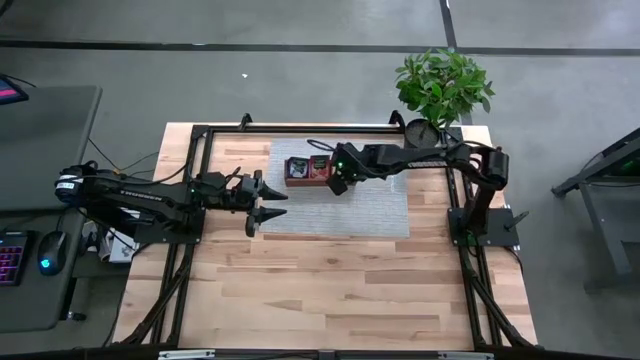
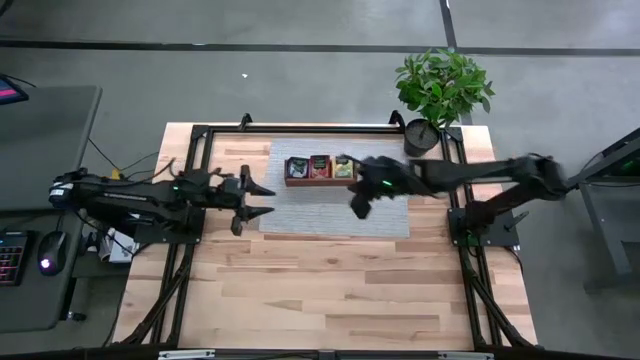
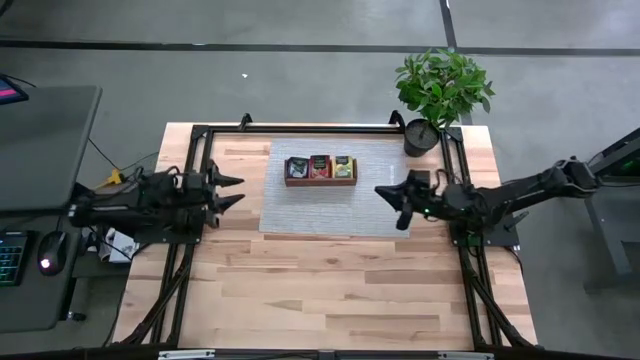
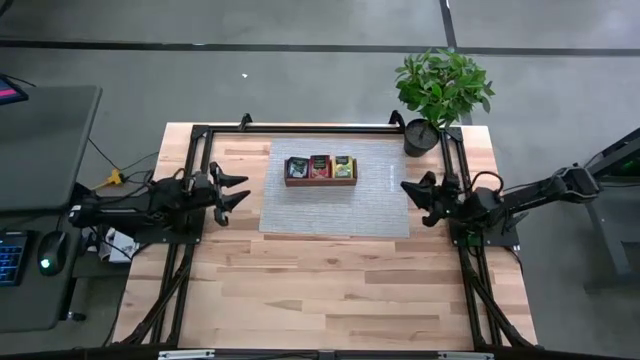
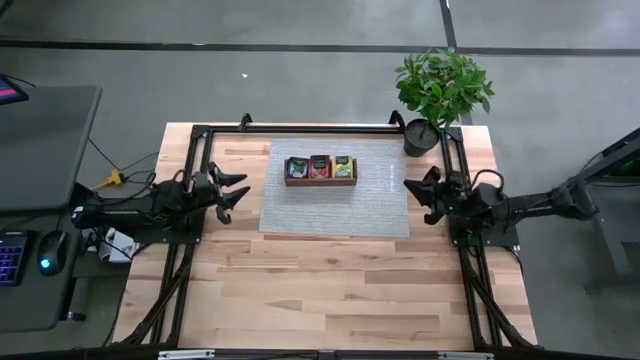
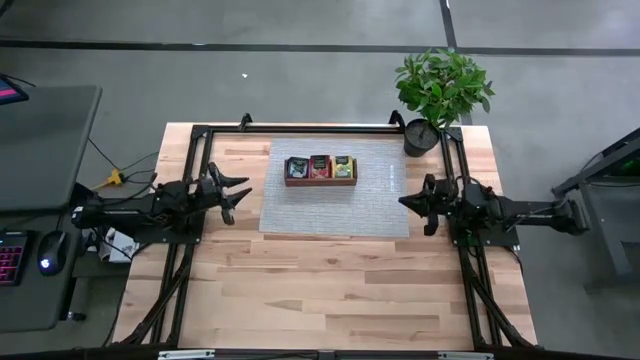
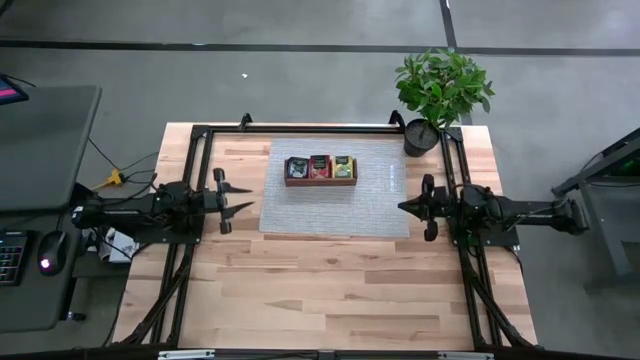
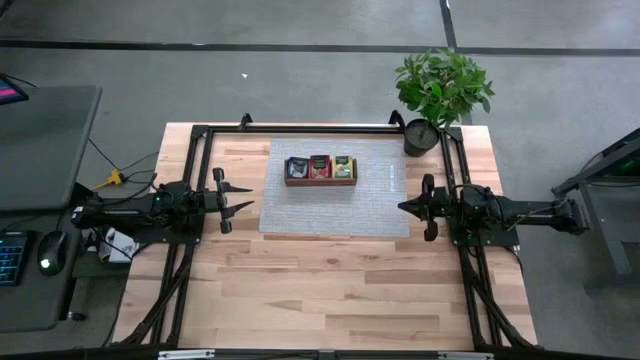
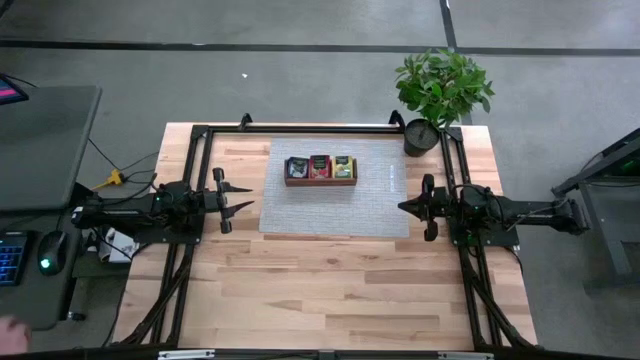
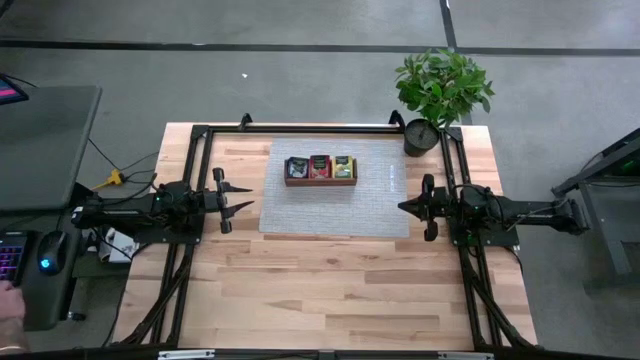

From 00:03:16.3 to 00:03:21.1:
Task: Pick & Place Tea
Return to Home Position

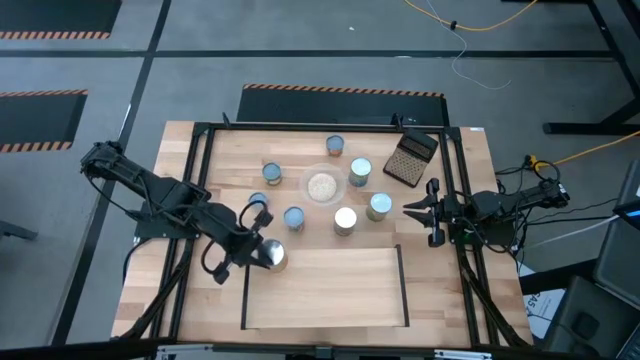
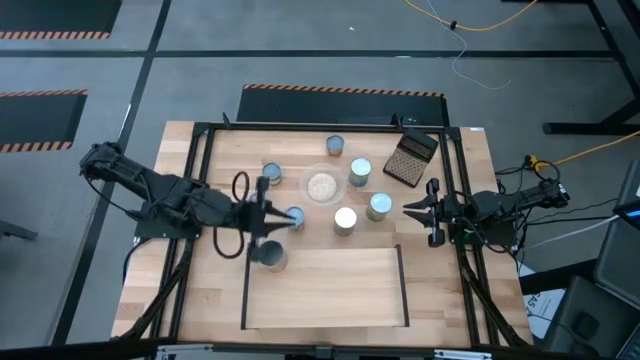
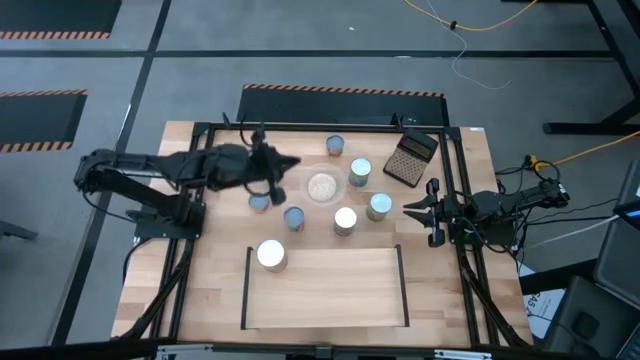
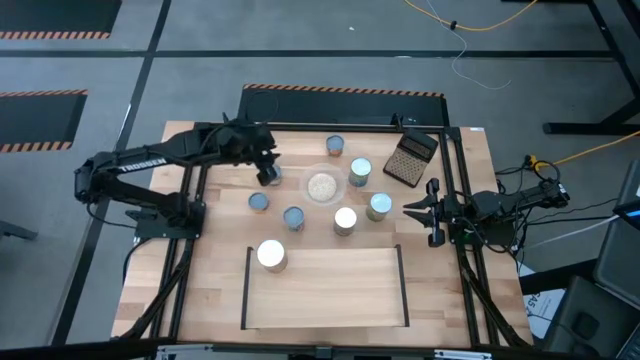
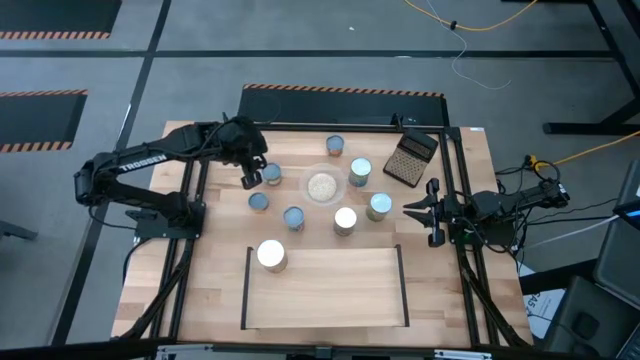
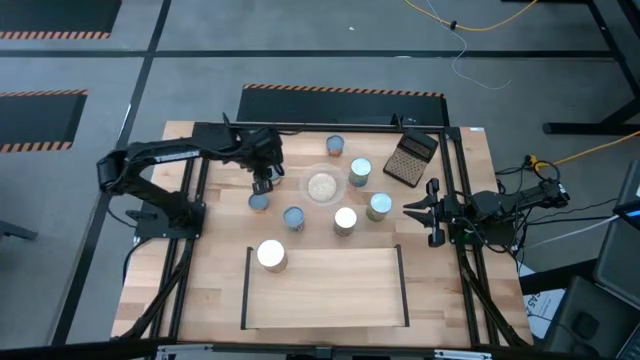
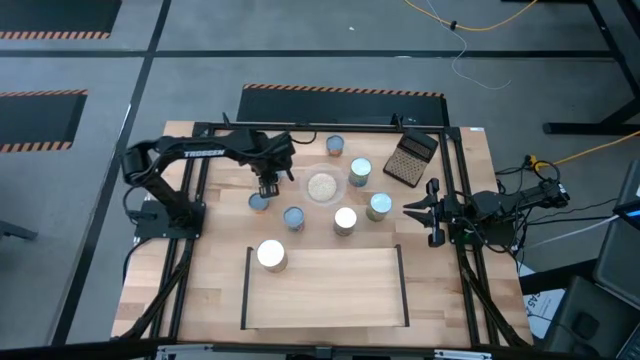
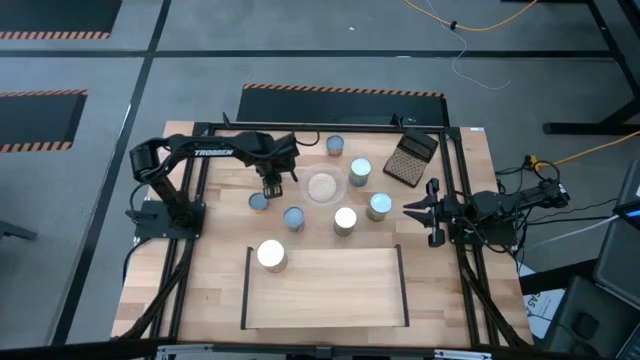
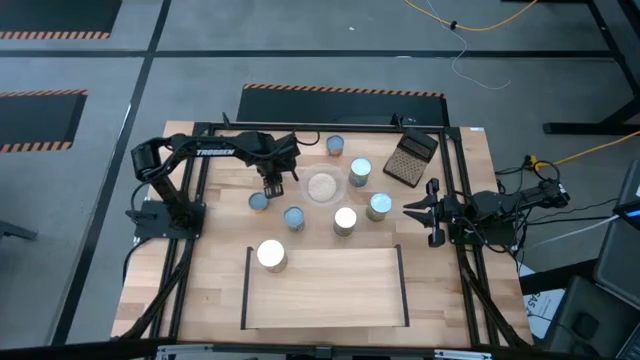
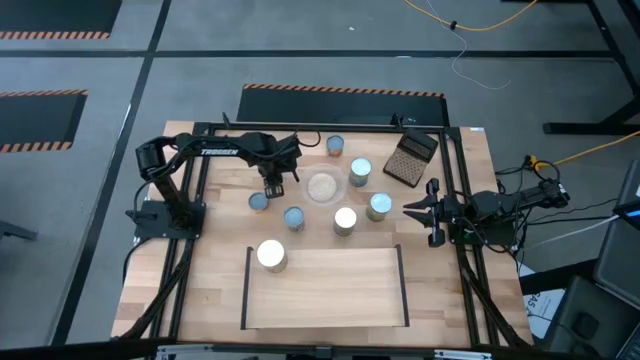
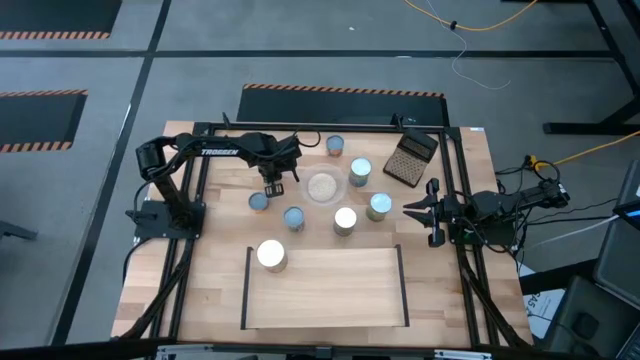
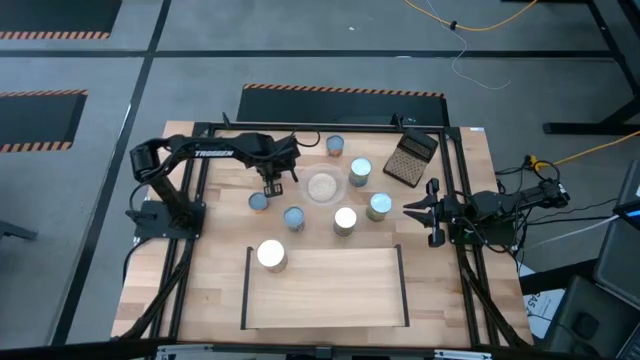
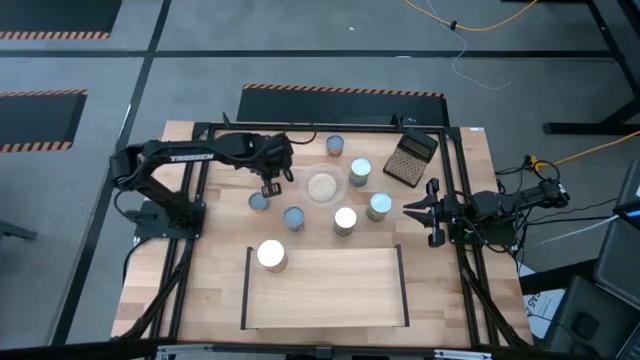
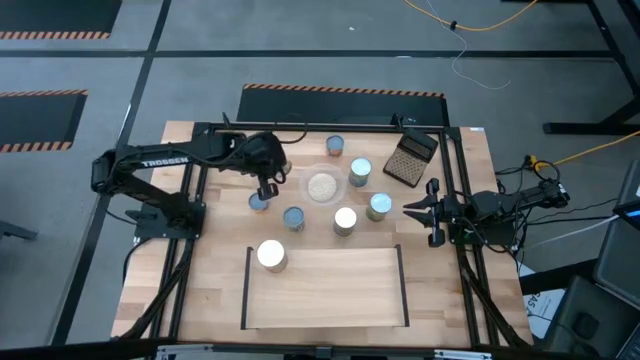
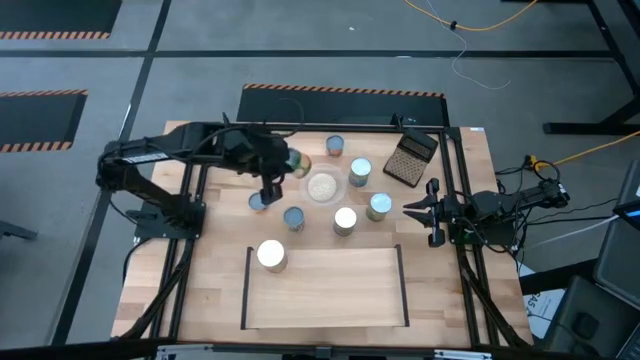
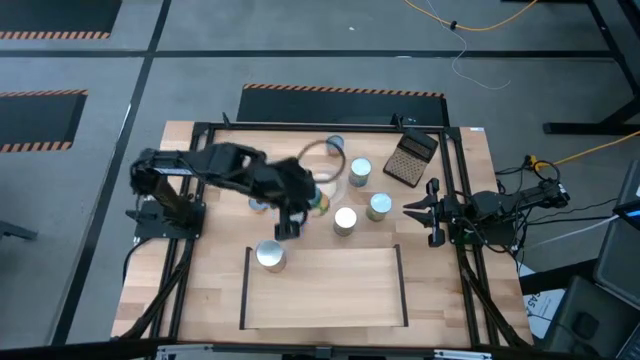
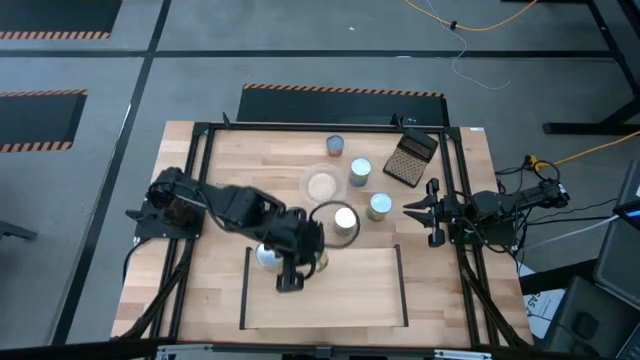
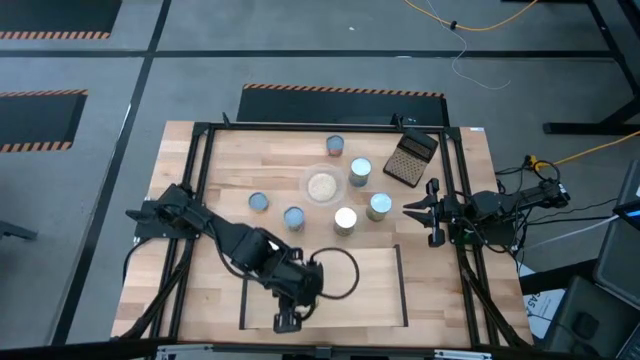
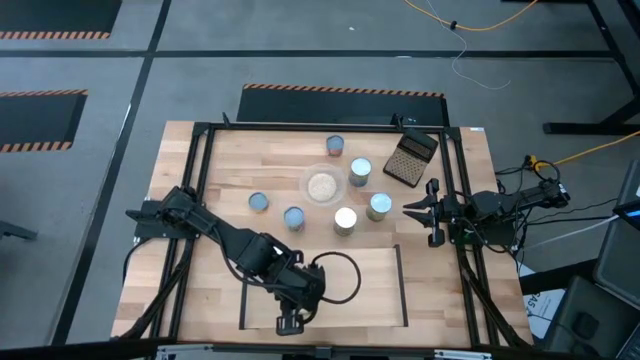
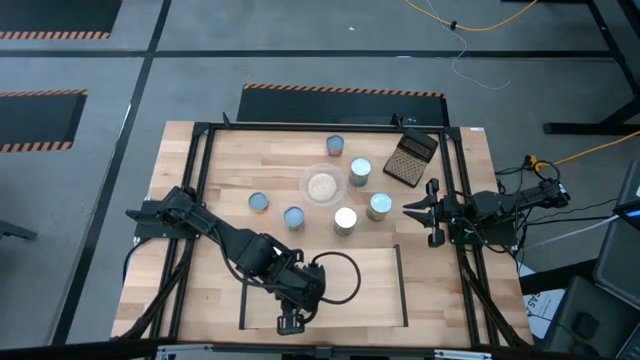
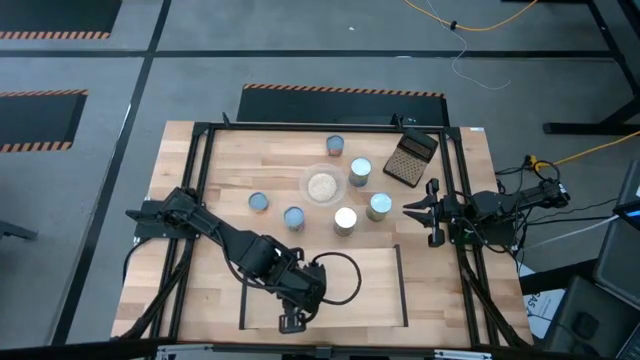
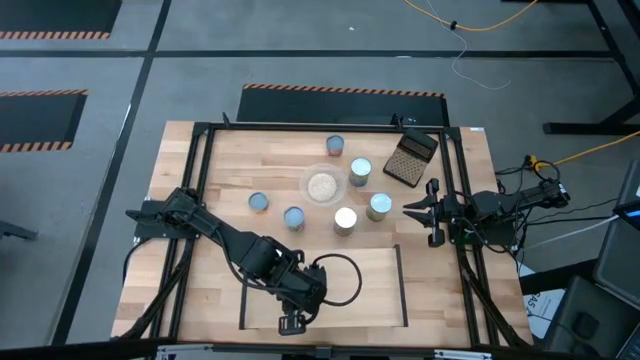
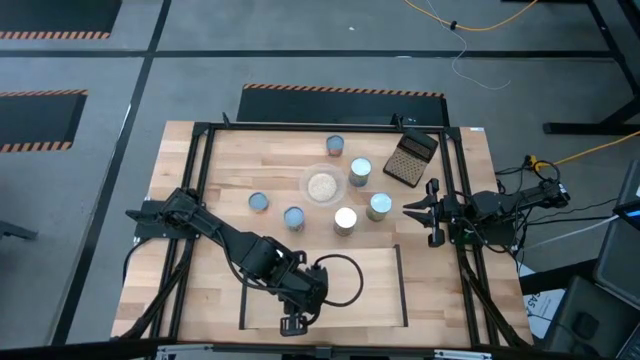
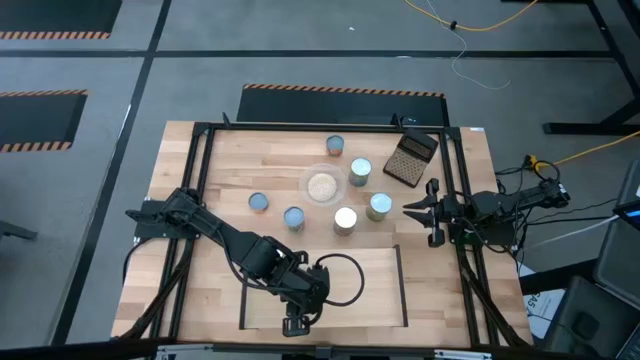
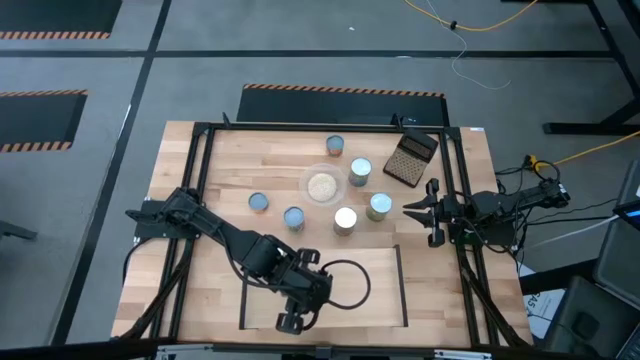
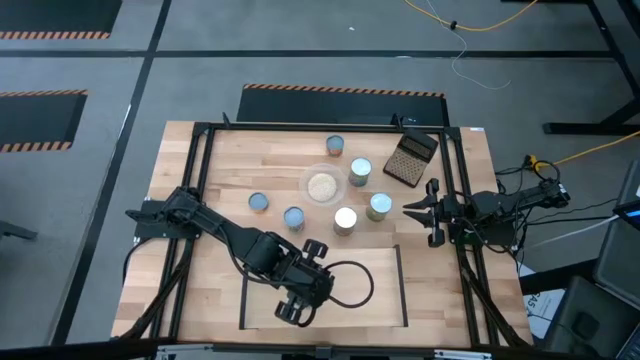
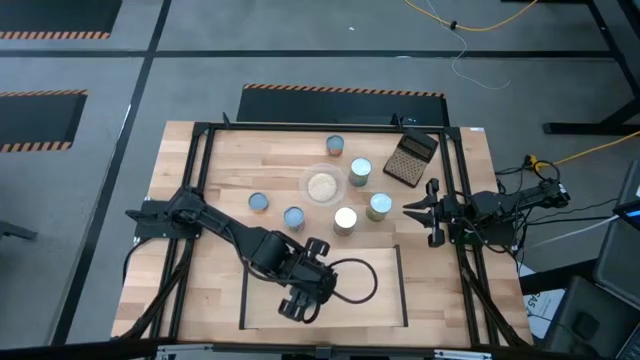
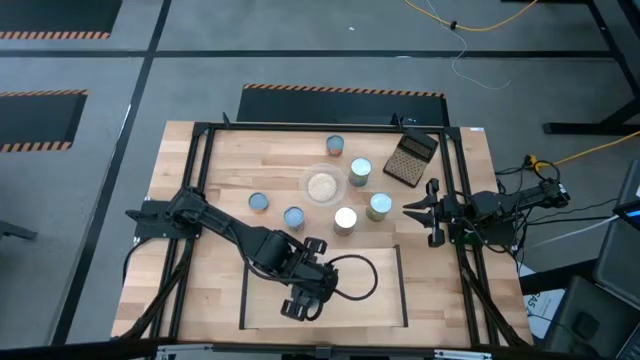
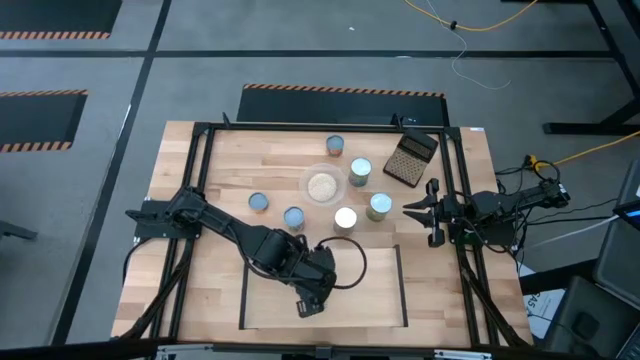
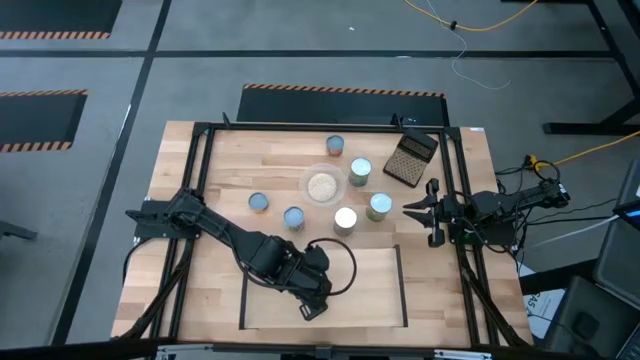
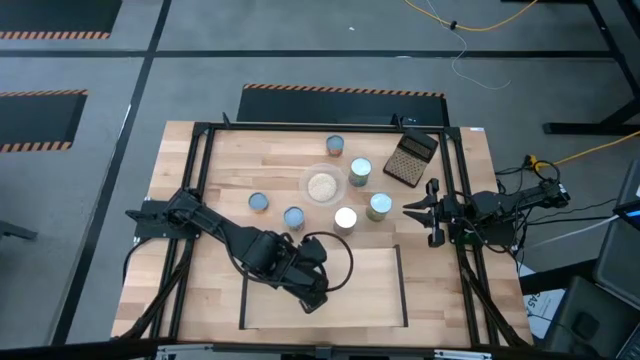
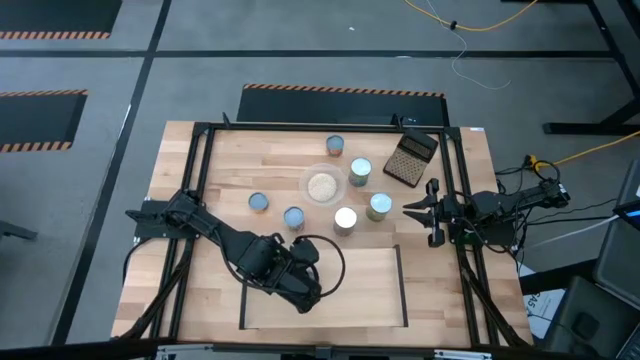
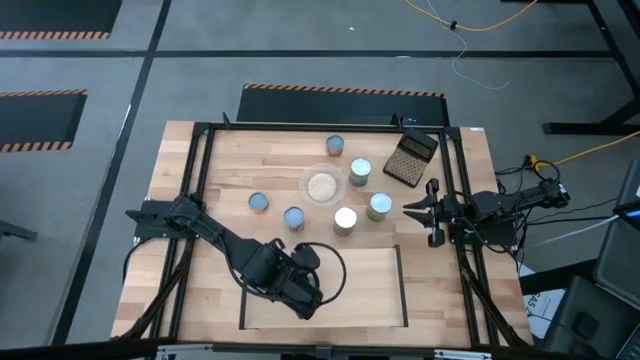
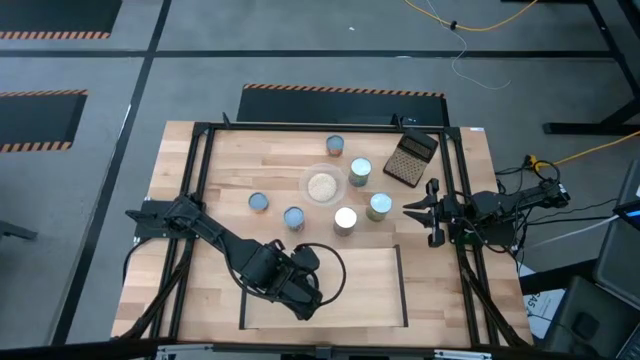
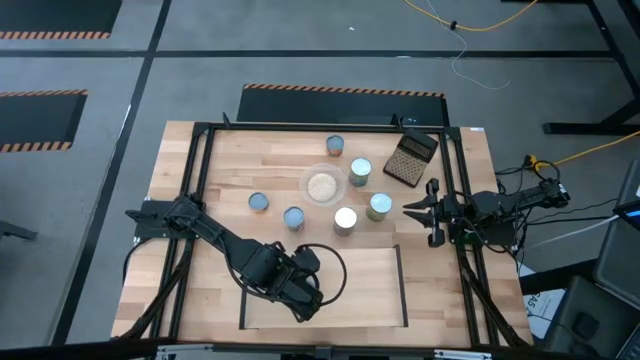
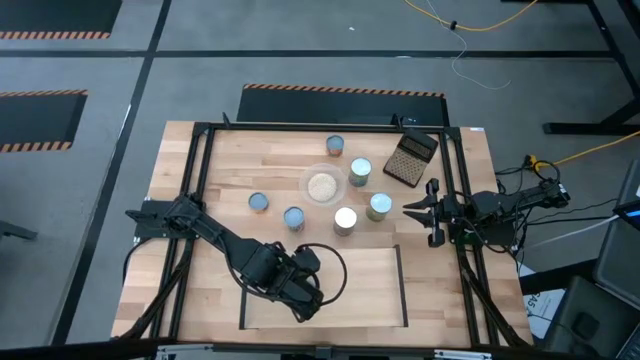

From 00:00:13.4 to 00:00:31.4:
Task: Pick and place cans onto a shelf
Put the small canned peaches on the shelf
